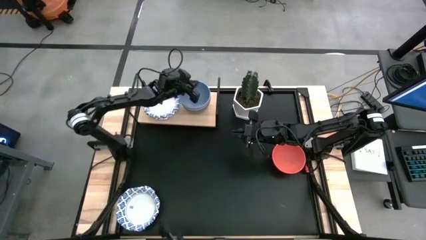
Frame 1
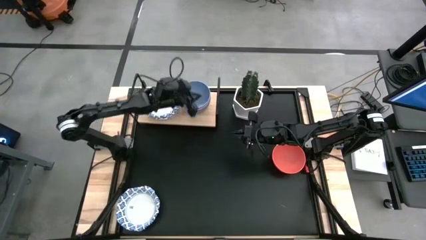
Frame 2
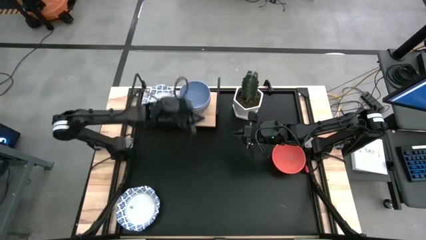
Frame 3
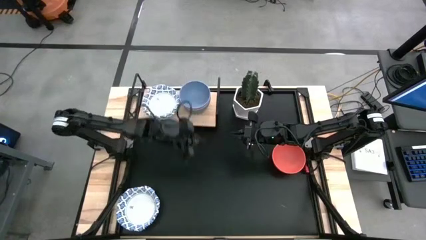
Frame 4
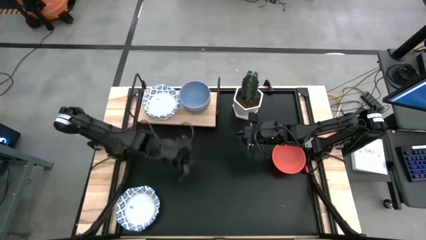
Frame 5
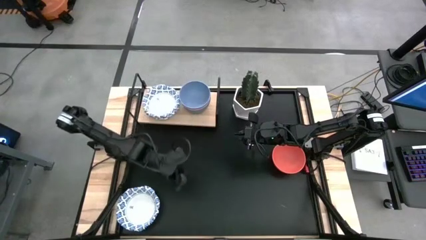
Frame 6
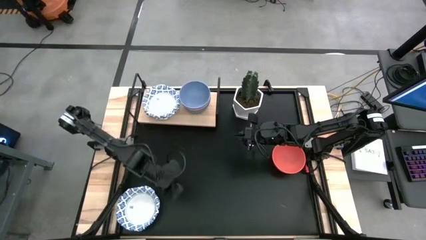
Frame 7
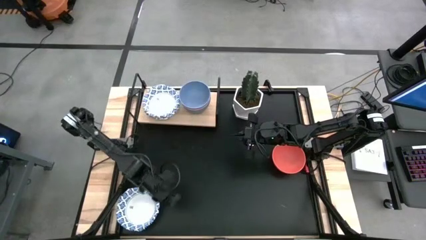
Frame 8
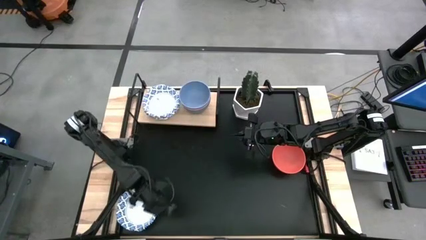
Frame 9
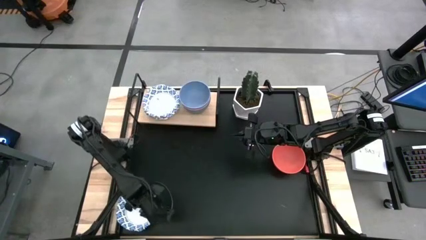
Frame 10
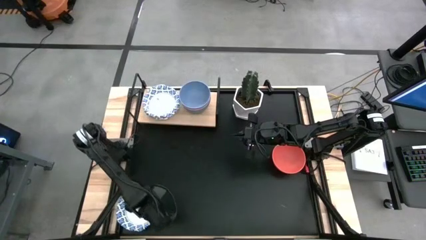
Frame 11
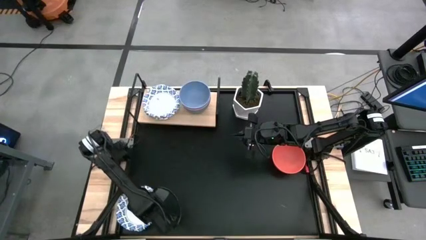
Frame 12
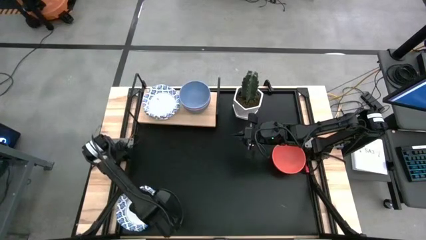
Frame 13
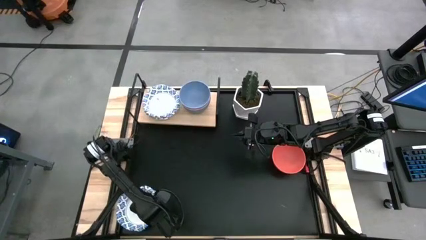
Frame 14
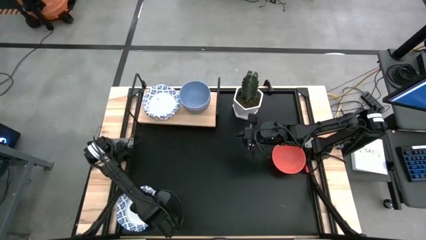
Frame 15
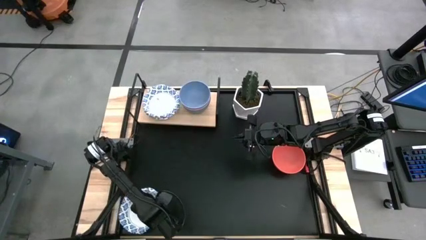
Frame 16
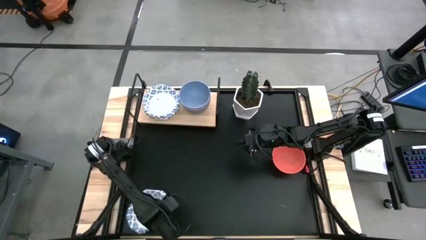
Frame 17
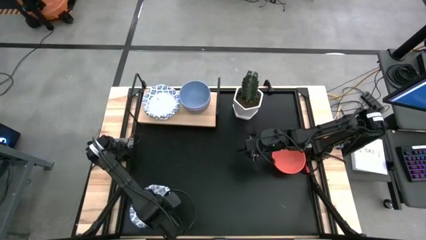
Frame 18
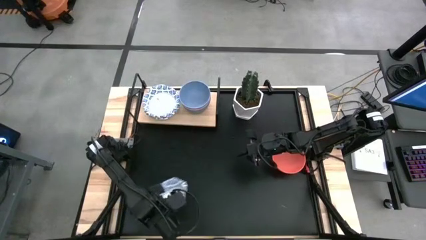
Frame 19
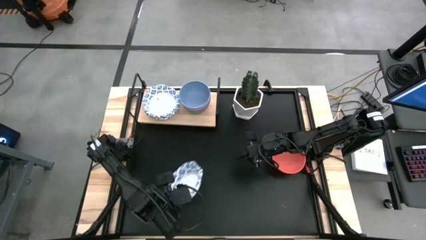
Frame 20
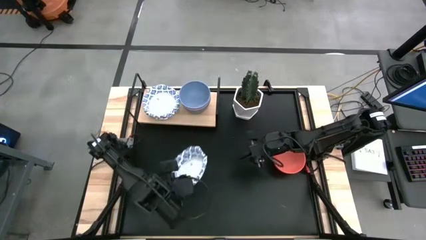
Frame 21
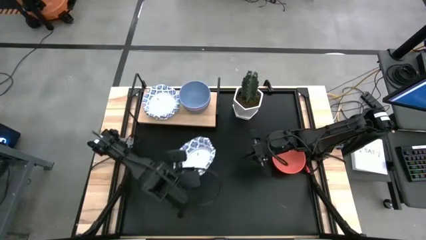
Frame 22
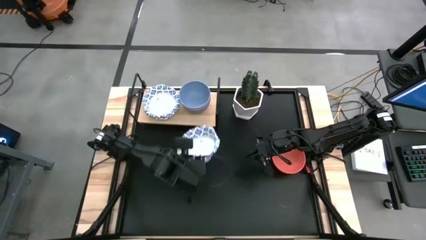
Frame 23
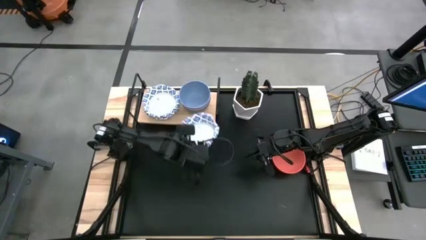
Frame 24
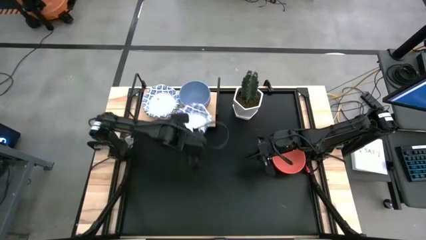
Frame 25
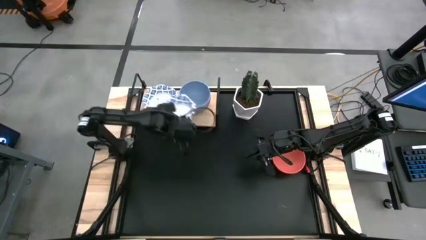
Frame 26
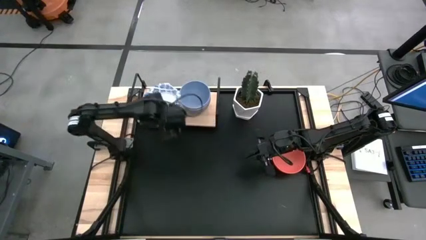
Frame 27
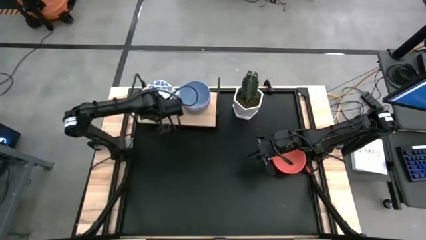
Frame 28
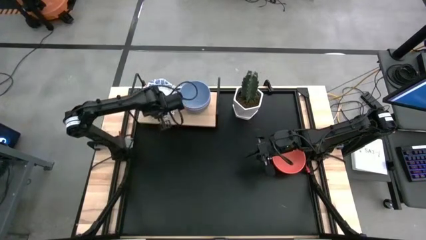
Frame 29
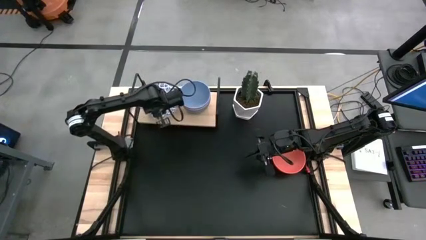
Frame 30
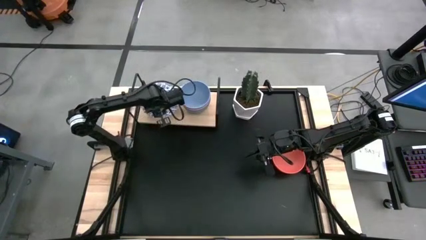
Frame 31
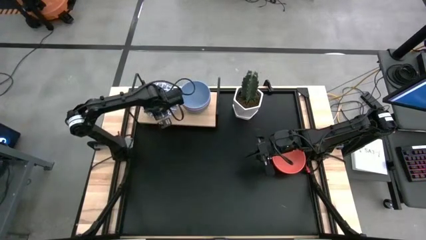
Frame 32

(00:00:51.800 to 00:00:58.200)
Task: Place and stack bowls onto a shelf
Stack the white patterned paper bowl on top of the white patterned paper bowl on the shelf

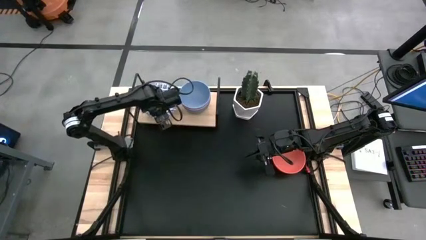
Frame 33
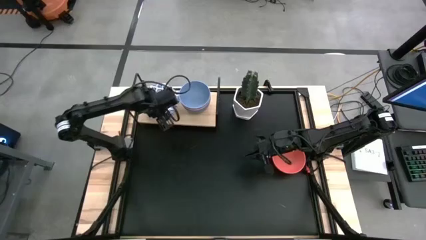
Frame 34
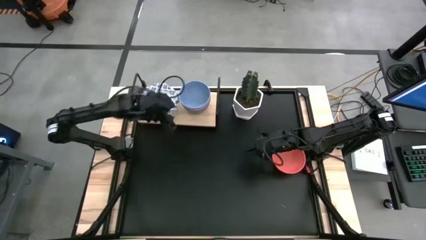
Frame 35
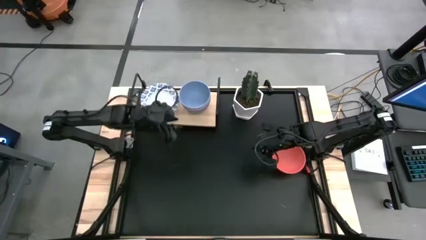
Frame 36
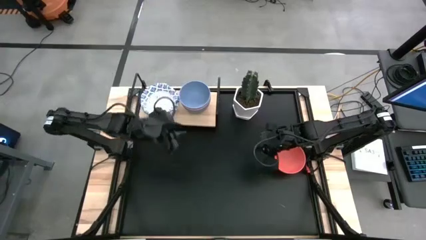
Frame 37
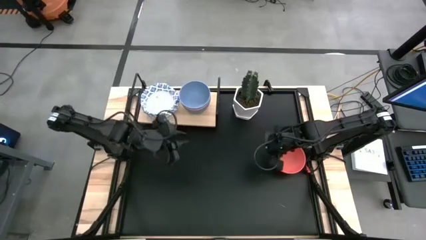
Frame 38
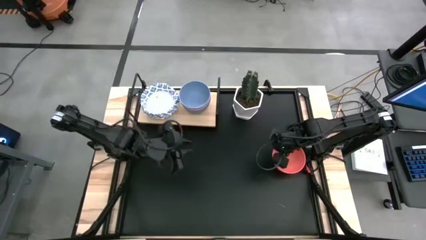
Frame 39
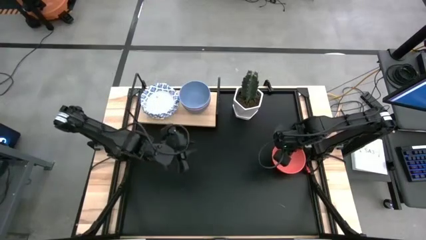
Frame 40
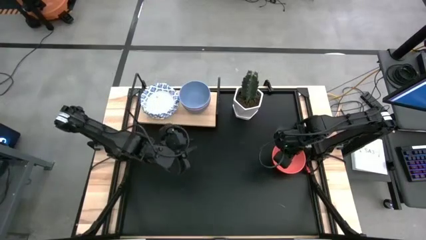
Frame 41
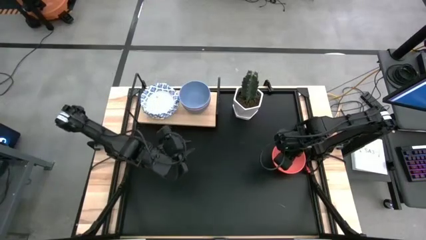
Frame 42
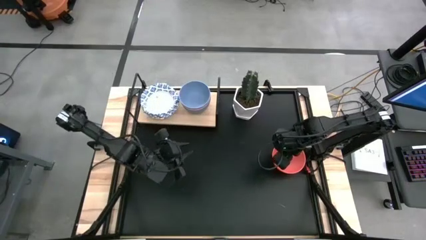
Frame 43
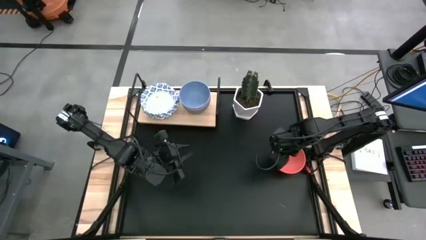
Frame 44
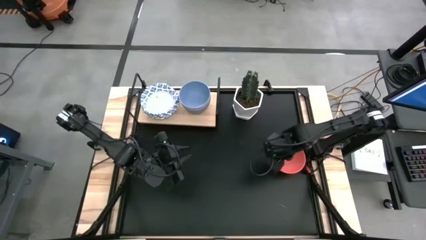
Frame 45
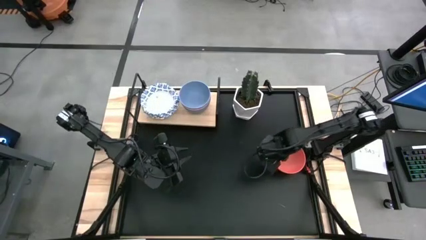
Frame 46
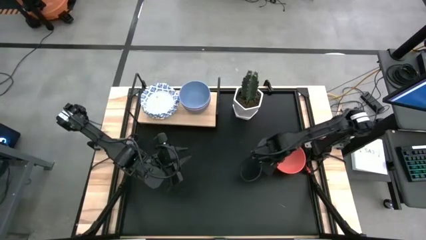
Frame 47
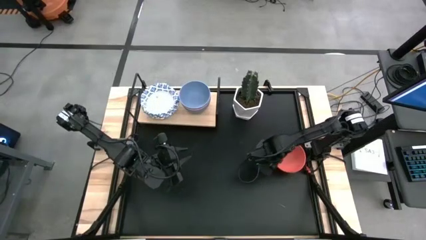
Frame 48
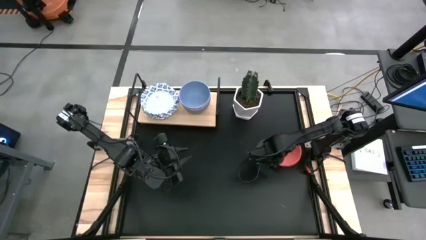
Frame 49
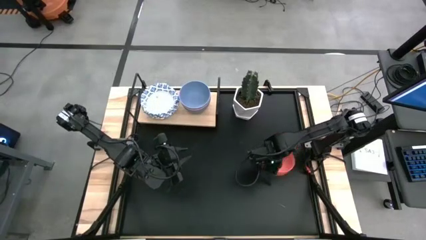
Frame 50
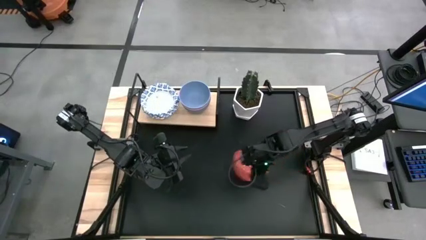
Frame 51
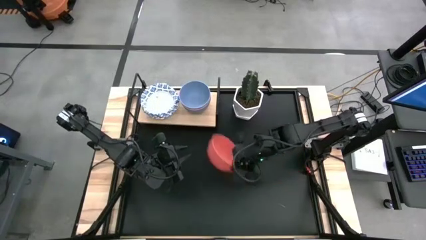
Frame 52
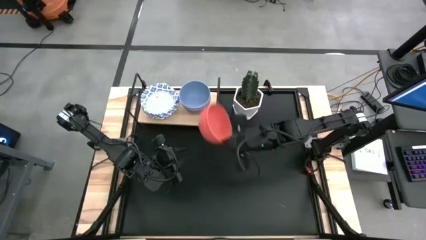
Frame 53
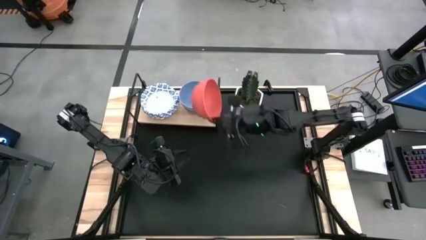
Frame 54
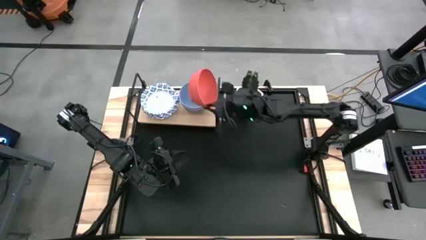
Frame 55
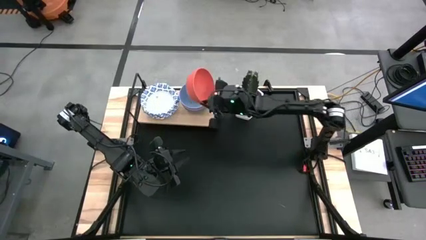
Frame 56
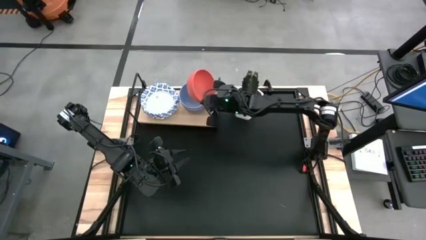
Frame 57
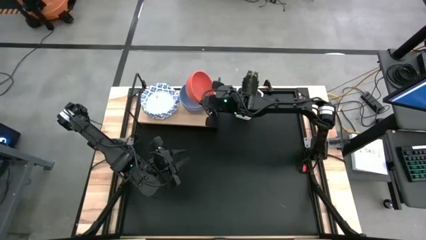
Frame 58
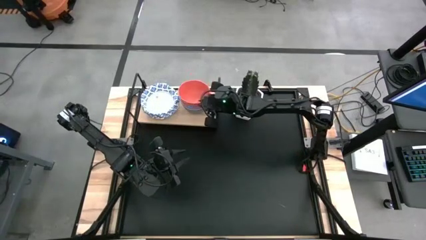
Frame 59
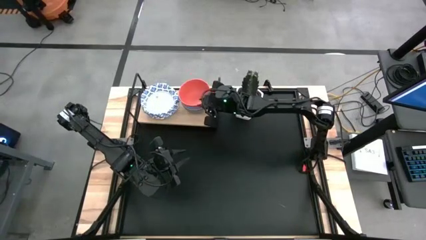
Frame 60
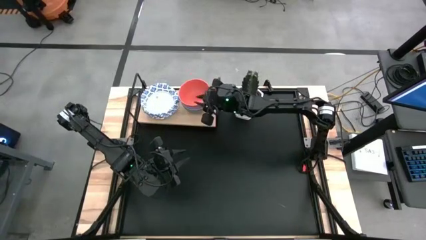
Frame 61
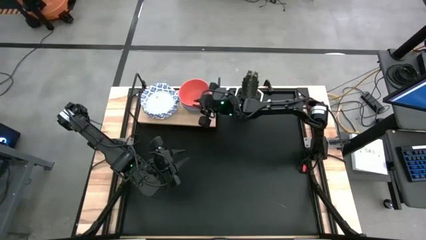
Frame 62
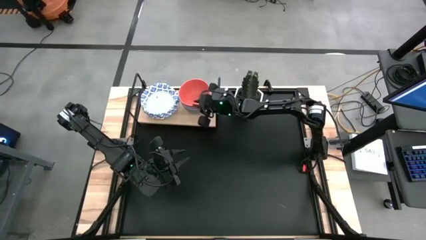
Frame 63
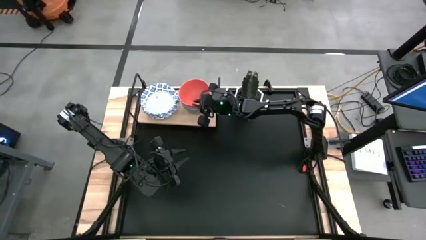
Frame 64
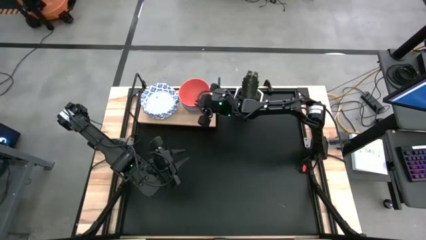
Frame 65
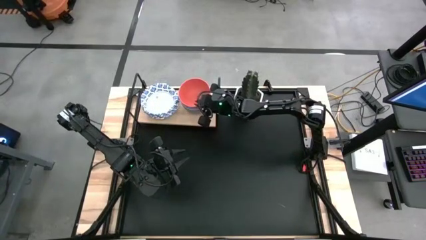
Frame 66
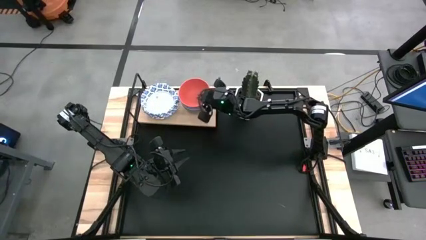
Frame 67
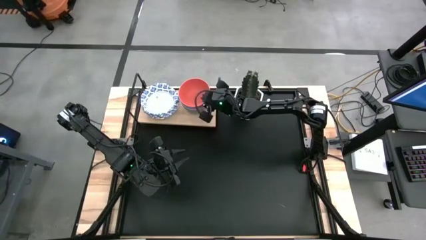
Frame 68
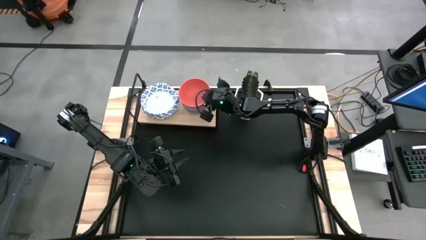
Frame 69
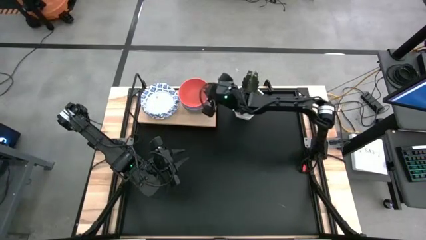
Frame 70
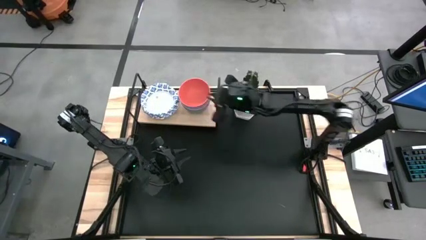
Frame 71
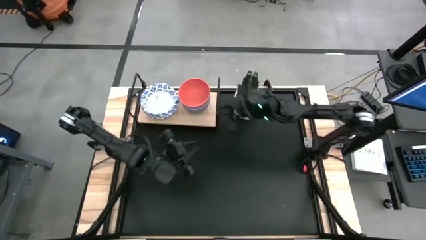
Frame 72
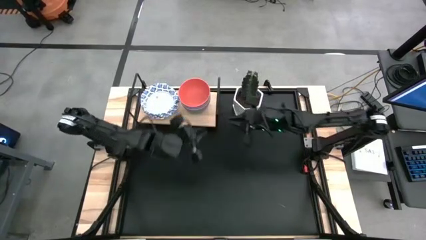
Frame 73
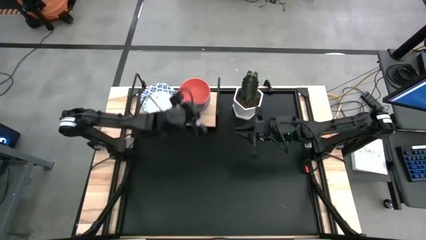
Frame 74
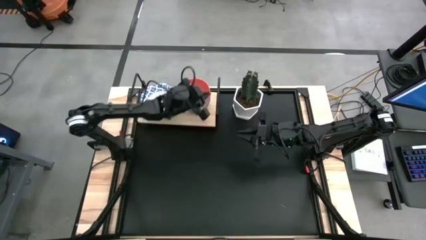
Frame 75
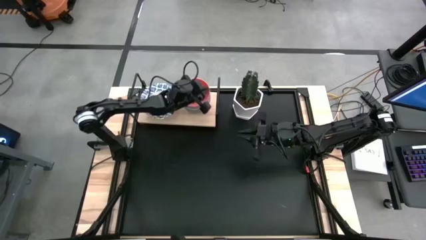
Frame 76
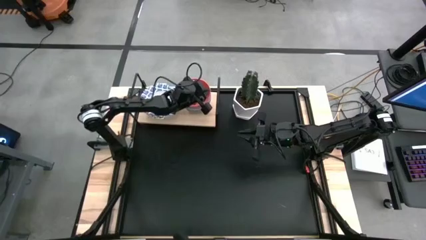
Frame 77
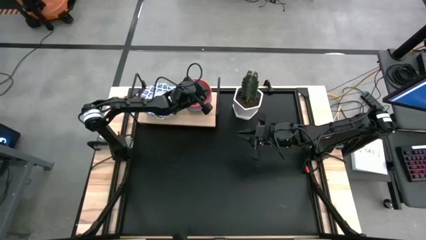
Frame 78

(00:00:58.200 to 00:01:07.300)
Stack the orange bowl on top of the blue bowl on the shelf
